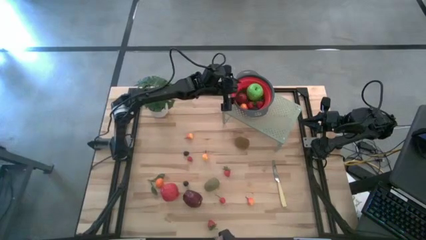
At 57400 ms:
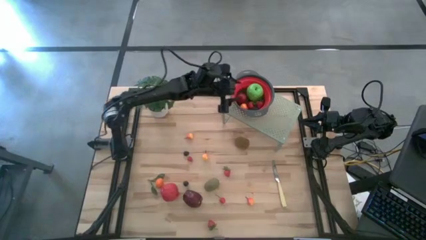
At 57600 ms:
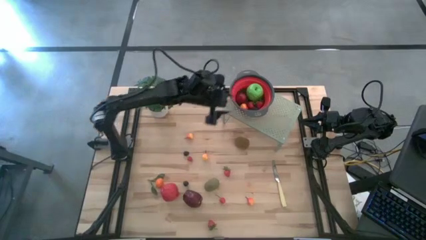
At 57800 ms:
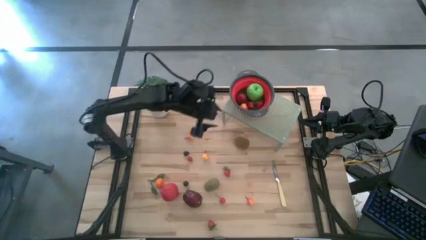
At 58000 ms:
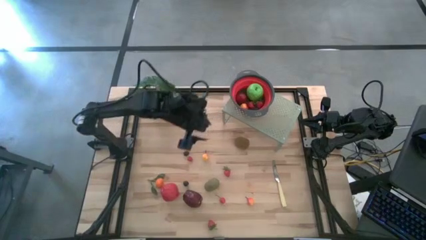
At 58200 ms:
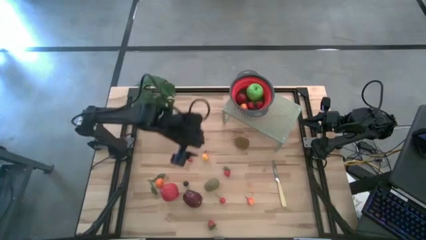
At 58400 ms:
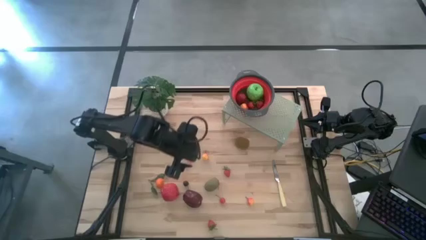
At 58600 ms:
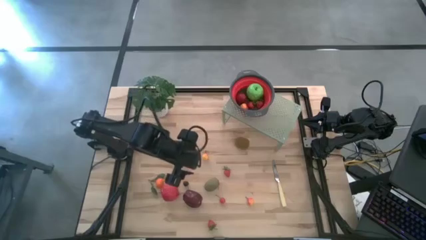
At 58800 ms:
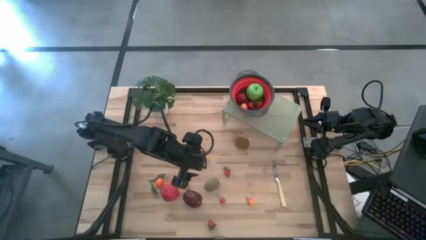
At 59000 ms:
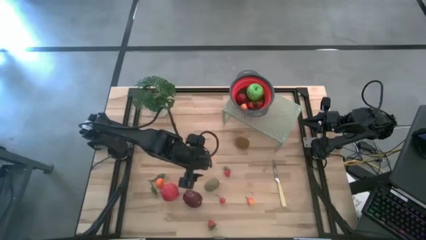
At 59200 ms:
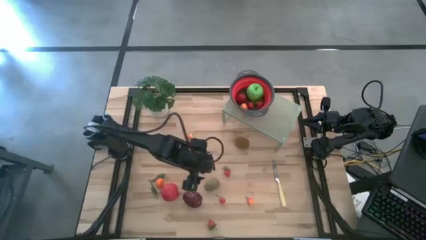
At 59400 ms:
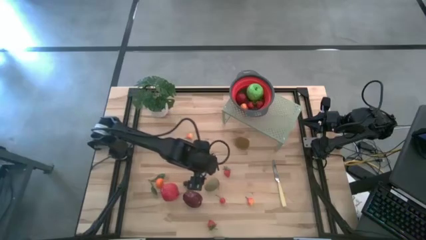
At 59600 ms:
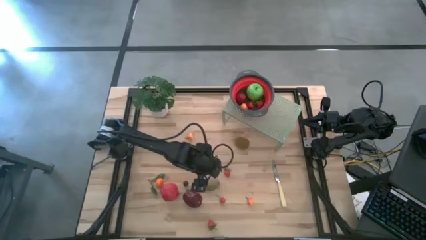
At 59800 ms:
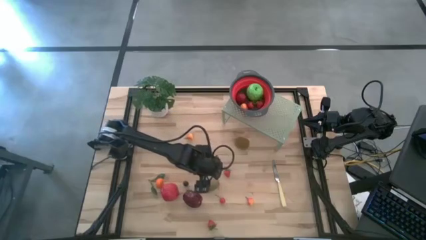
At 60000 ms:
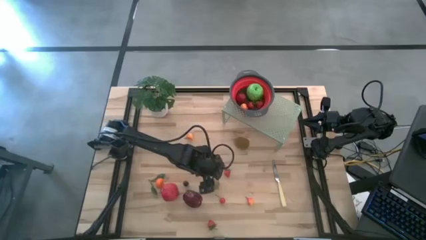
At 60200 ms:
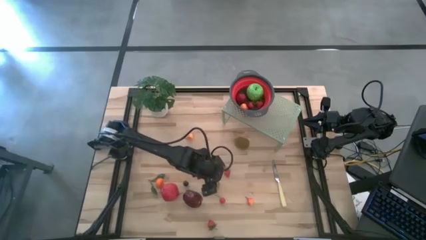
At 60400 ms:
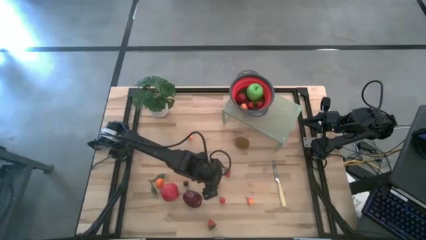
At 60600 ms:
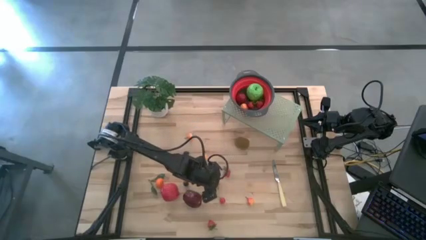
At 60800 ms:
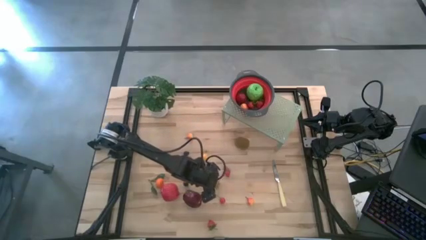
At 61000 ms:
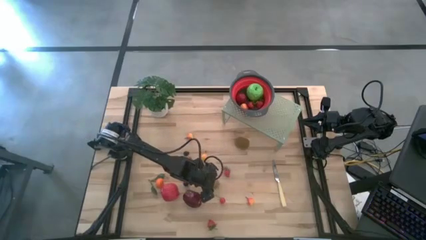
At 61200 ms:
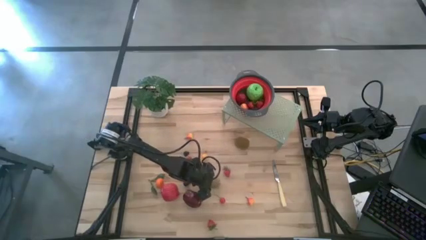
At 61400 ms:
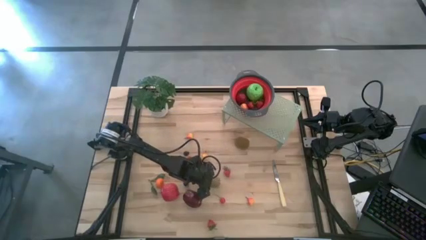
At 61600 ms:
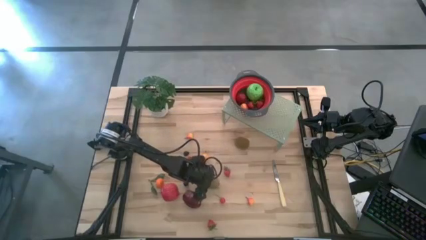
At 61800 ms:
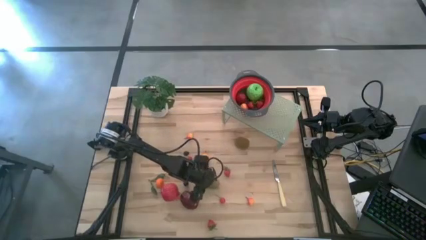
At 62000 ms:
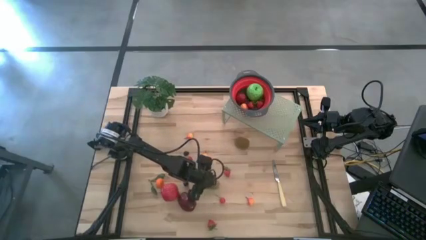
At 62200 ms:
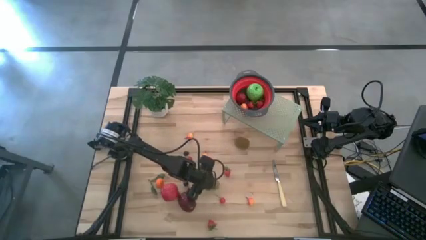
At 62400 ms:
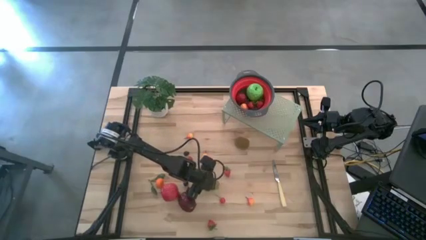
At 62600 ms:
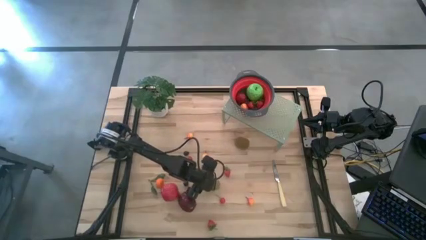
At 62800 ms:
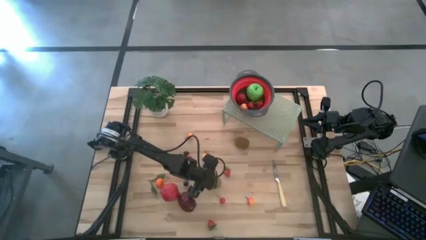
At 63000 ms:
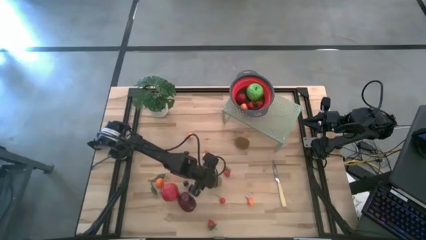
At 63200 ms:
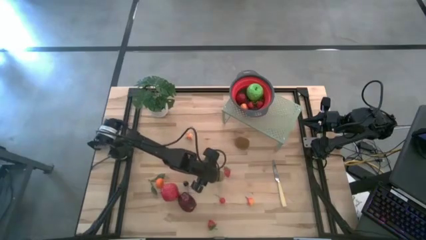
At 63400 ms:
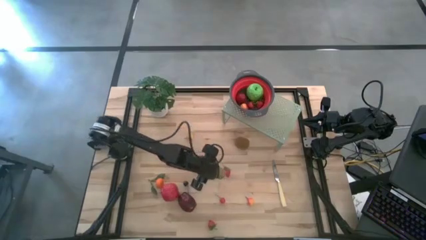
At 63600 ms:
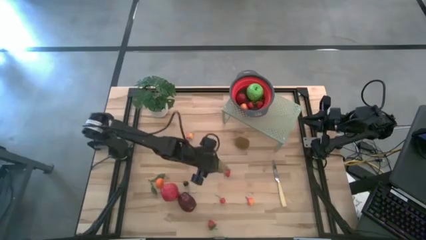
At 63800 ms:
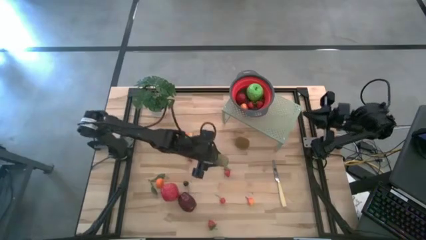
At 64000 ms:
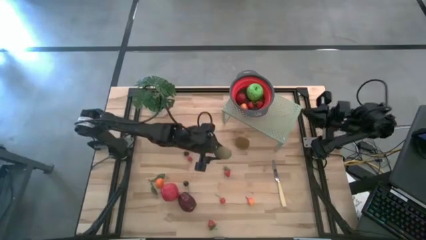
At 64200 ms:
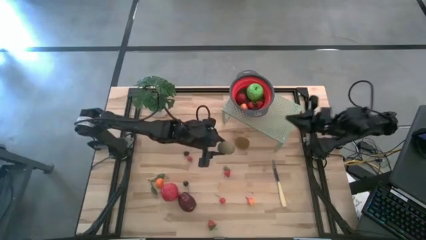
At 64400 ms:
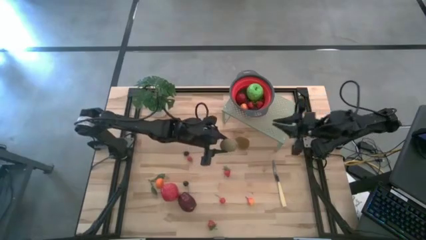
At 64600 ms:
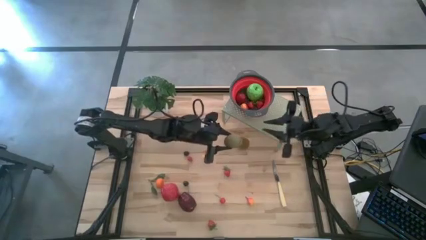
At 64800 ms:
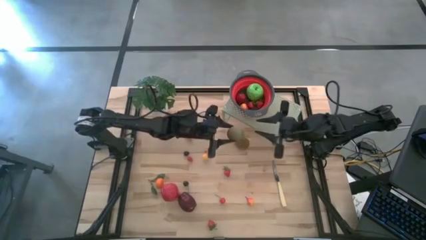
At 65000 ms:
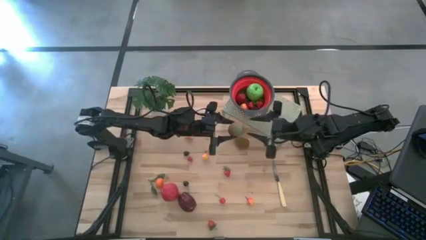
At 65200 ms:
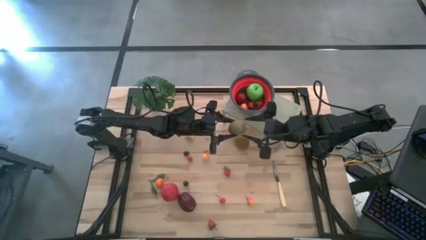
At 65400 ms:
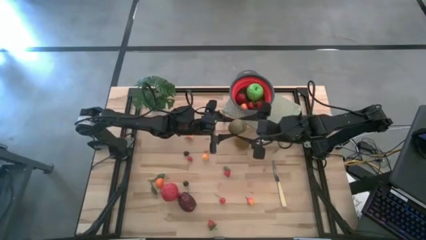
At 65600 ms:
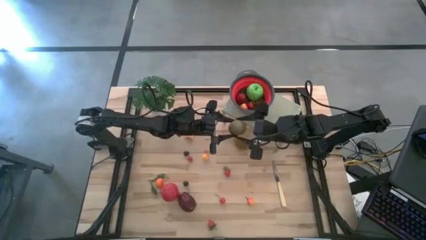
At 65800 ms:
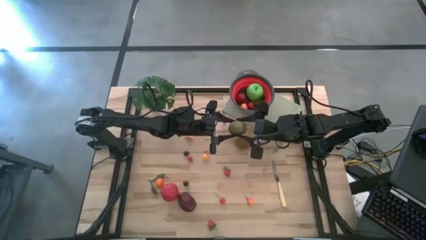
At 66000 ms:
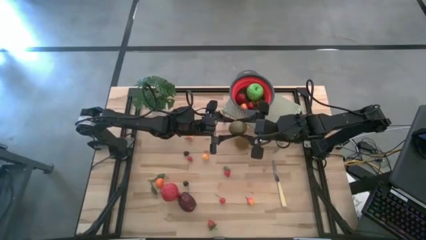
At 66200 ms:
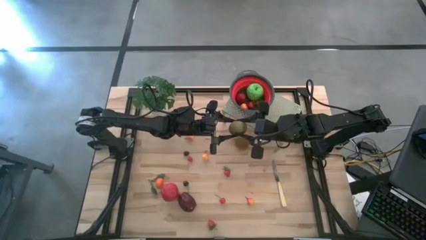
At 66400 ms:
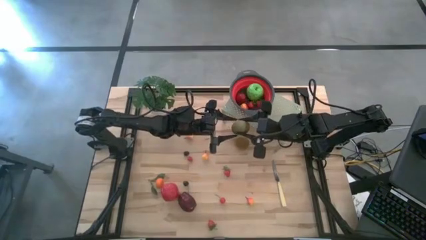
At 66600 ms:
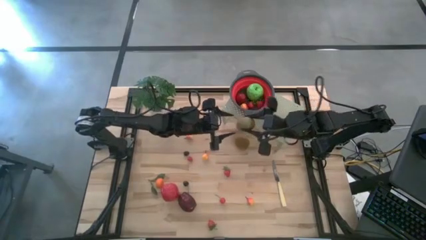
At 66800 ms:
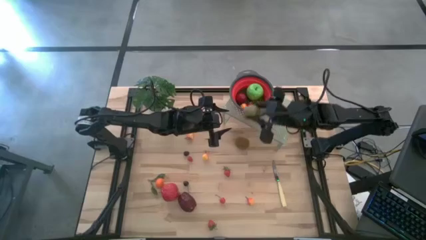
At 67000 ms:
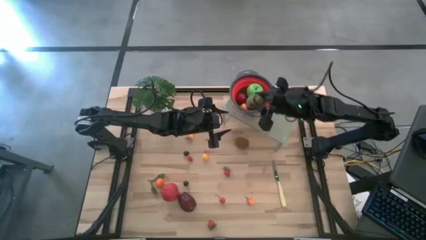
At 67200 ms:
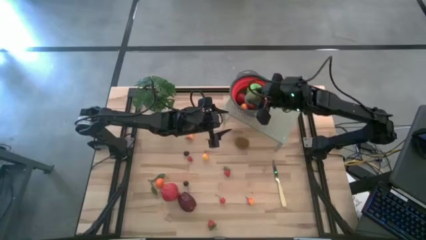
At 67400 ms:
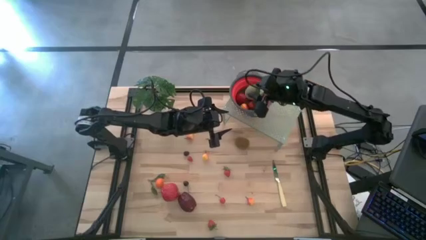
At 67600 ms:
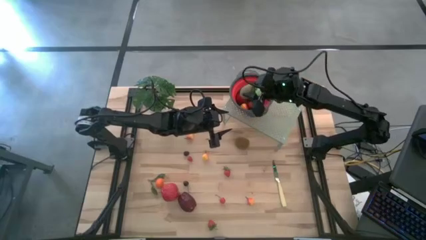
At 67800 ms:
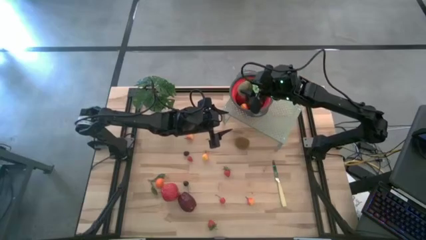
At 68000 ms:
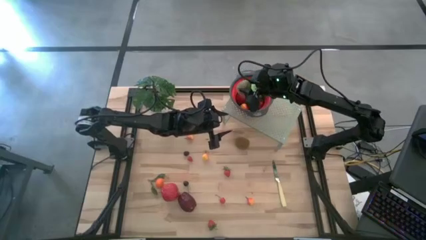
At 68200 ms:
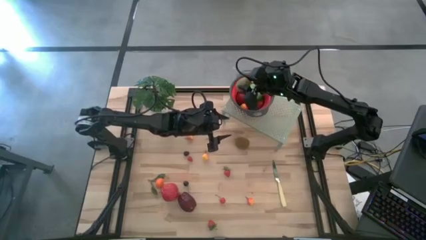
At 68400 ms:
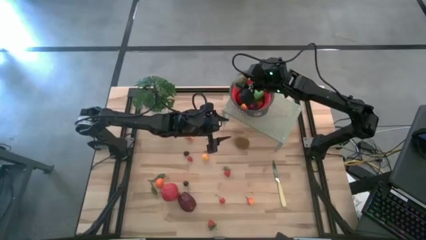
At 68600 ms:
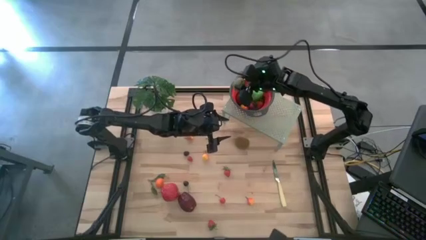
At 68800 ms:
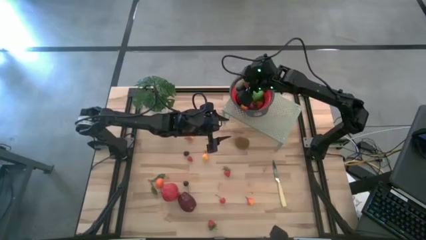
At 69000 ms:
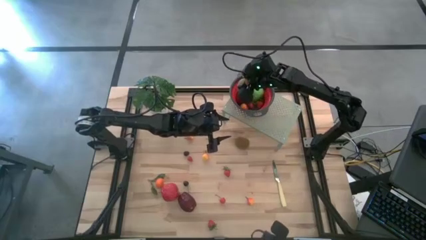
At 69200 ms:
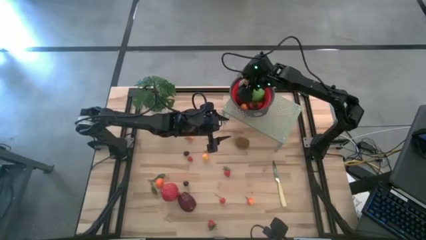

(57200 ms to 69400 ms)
Task: Pick & Place Fruit
Put the green kiwi into the red strainer bowl
